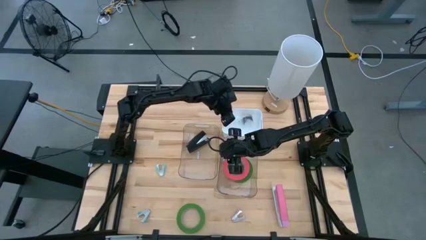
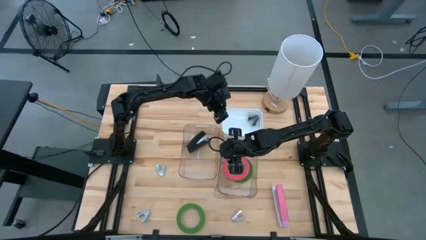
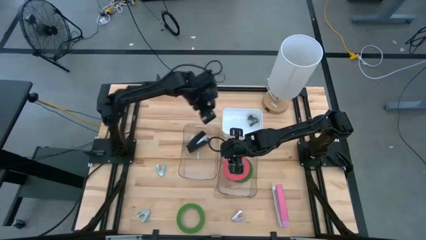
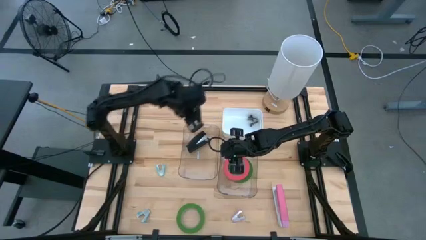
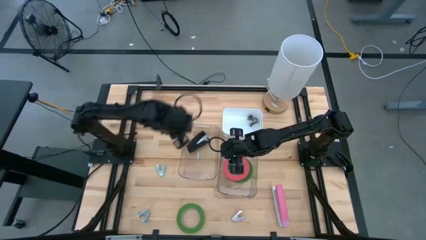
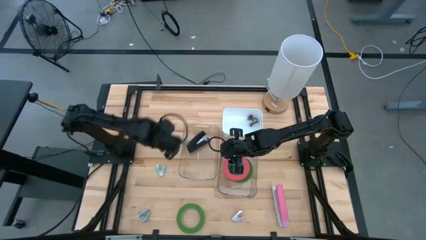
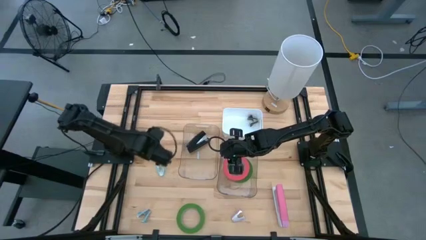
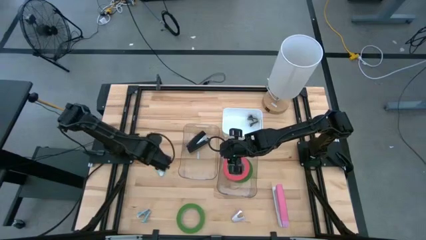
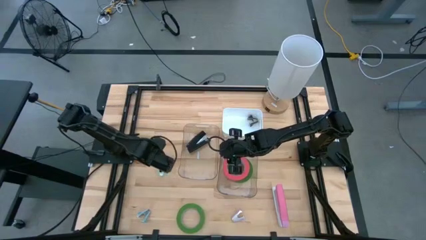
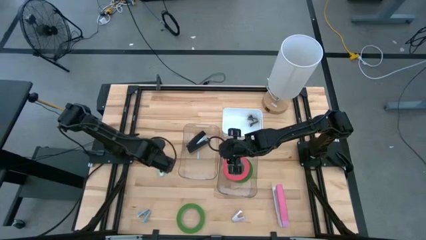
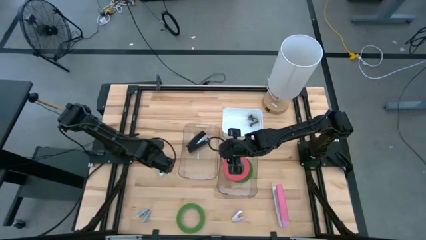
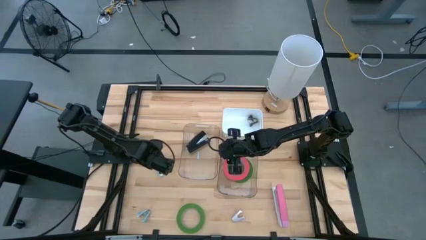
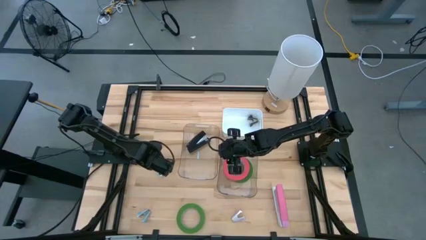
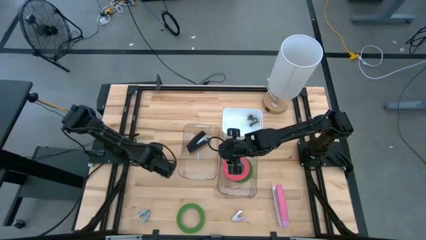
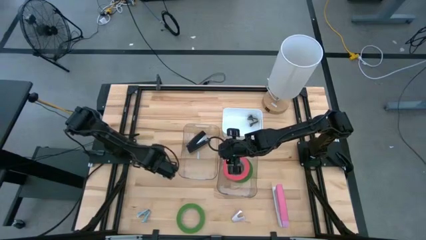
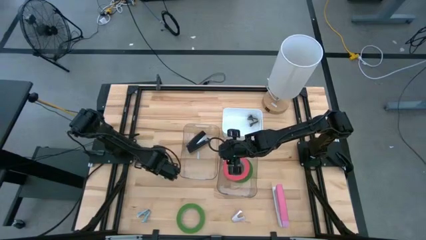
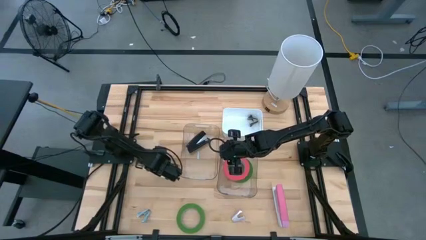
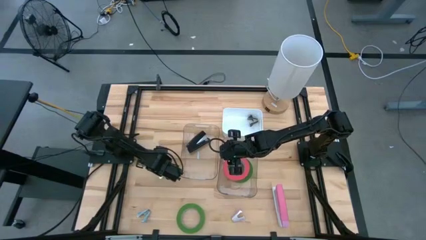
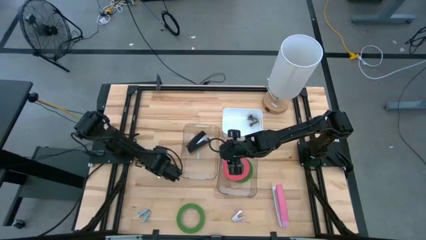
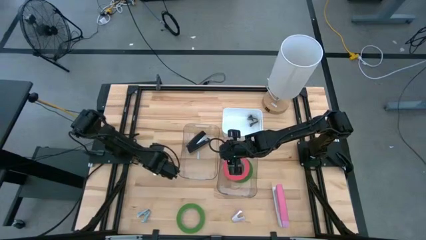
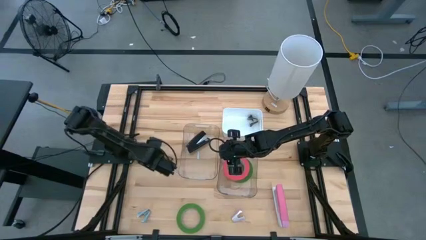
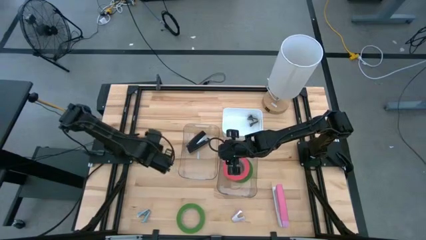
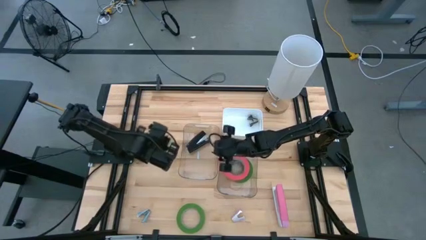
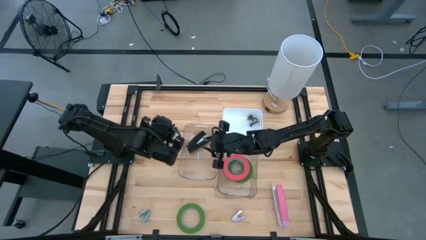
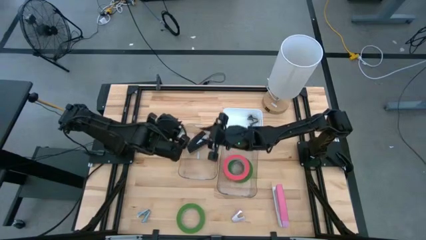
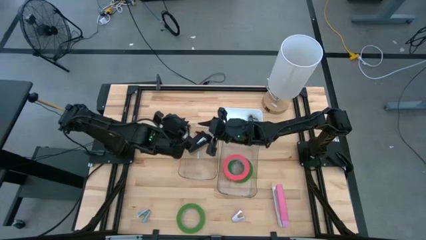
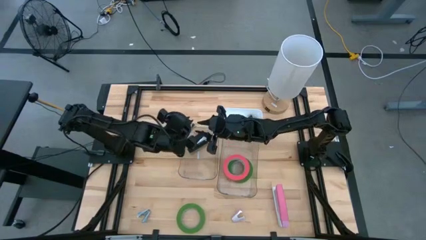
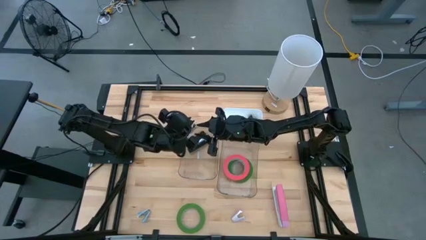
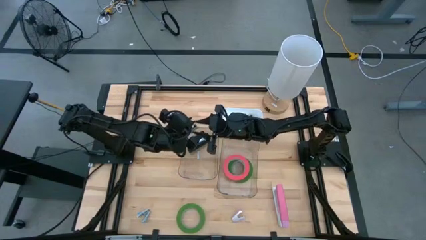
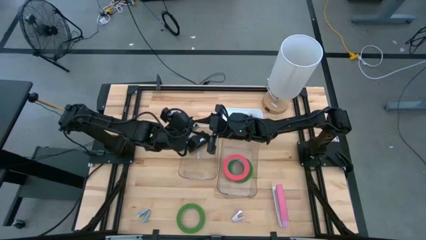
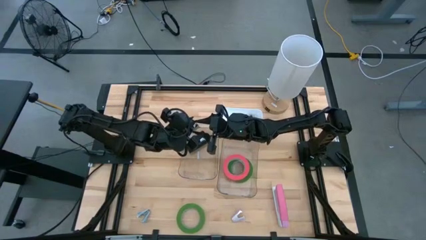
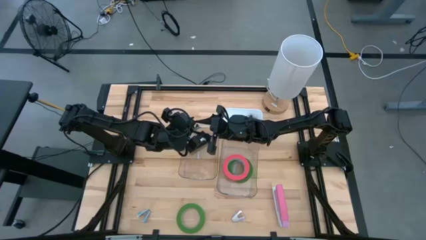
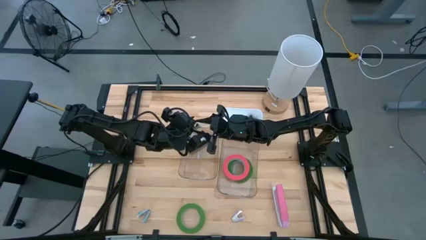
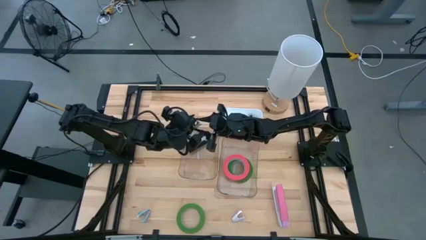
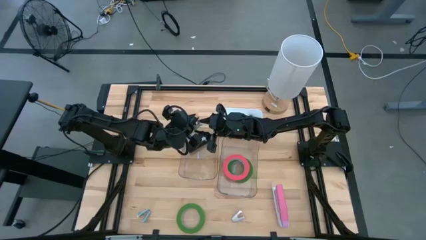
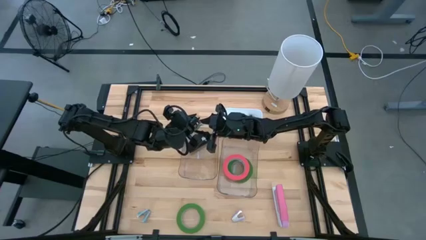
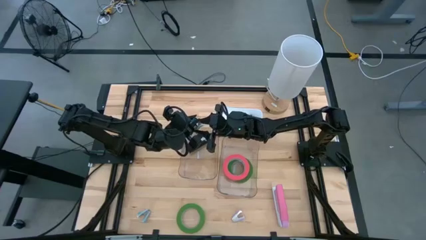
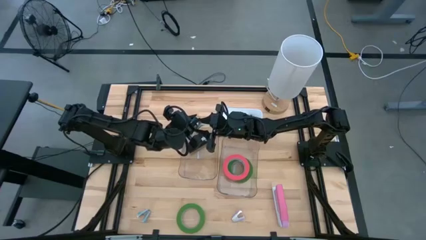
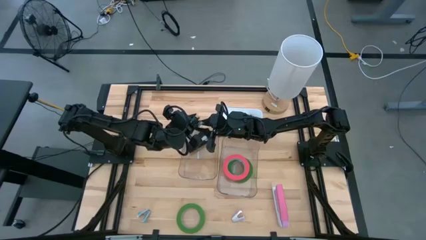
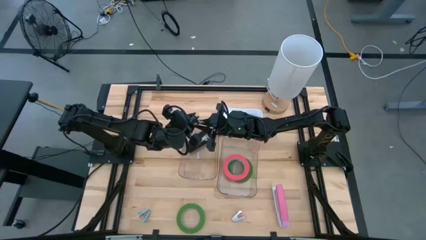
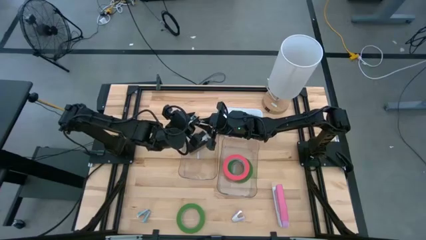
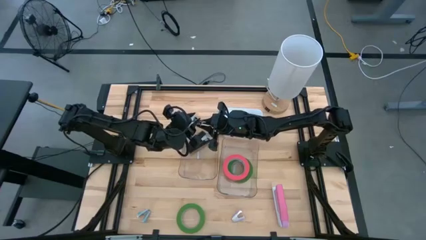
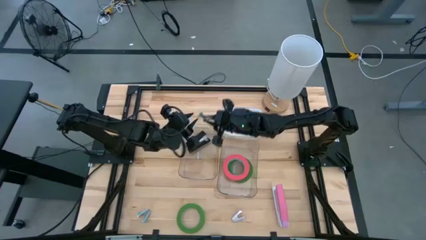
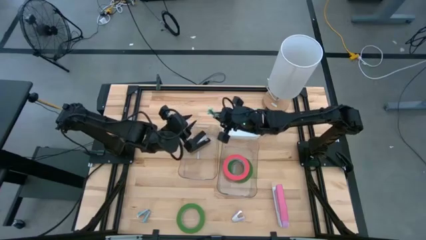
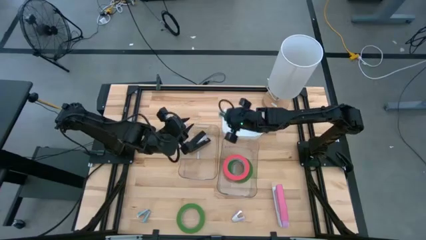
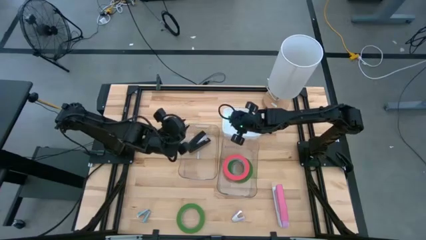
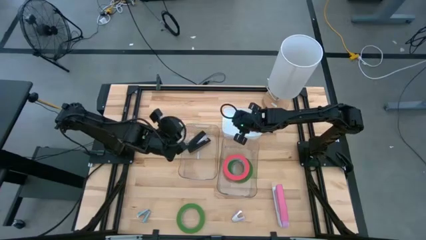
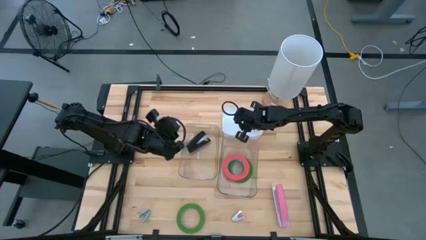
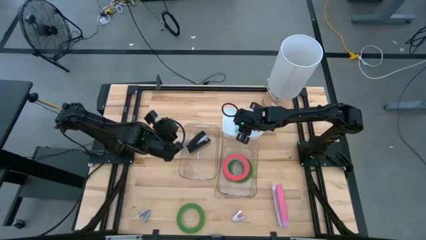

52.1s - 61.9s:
Task: Pick and place Stapler, Stapler remover, tape
Put the green staple remover into the white bin

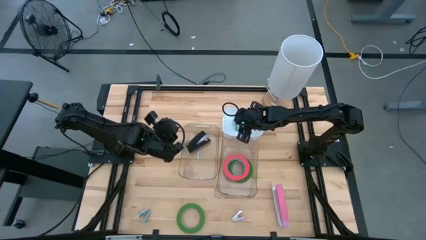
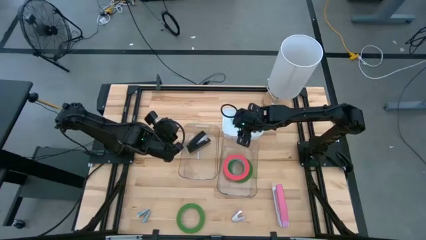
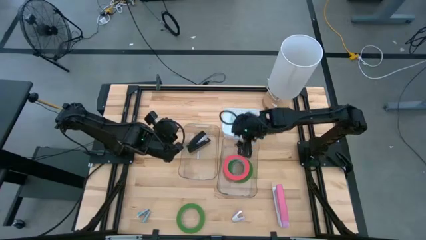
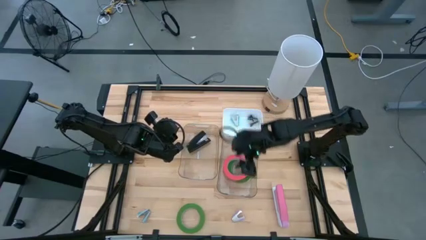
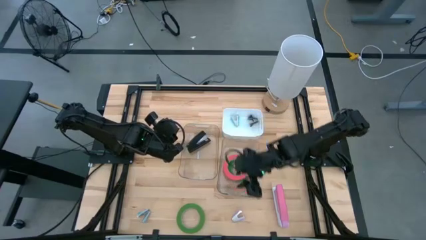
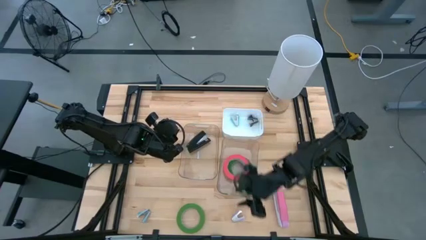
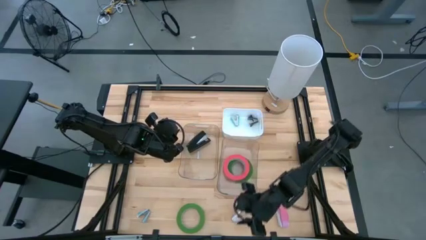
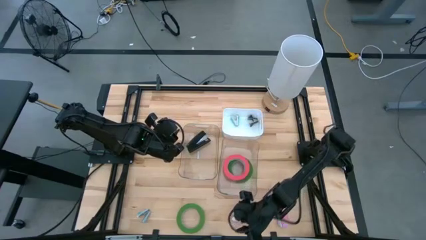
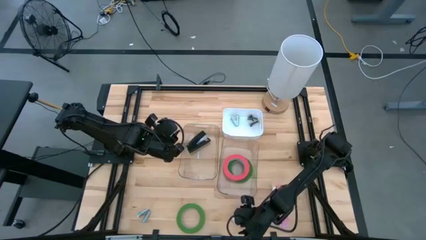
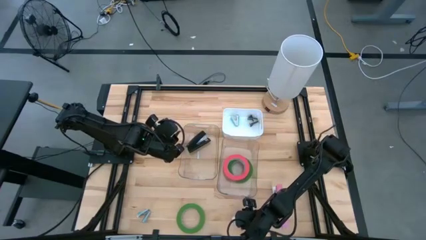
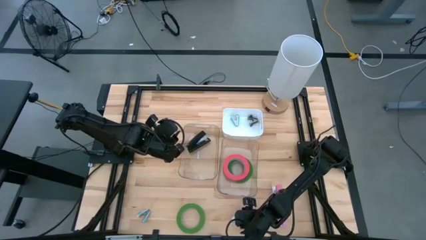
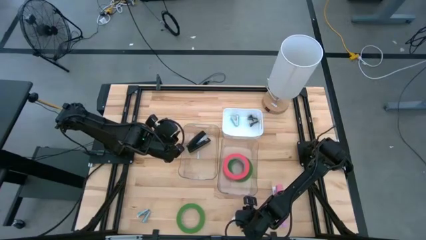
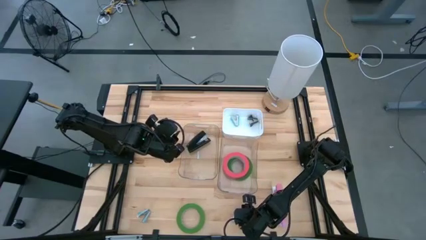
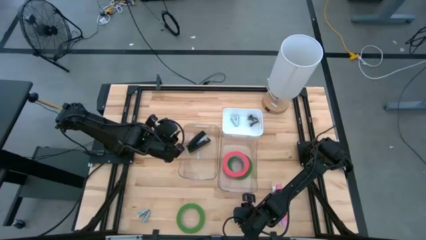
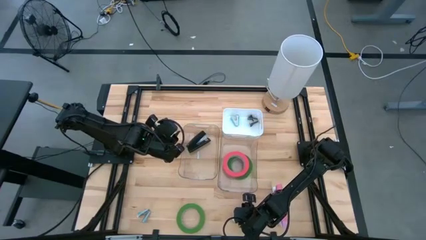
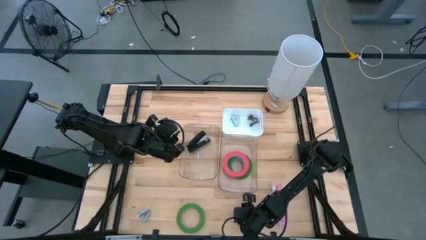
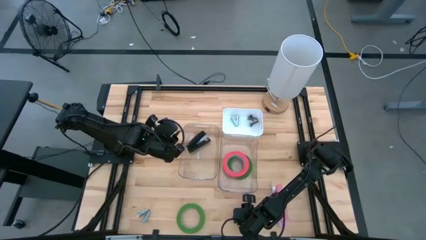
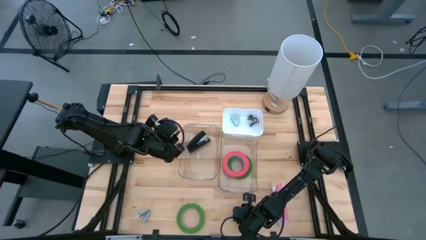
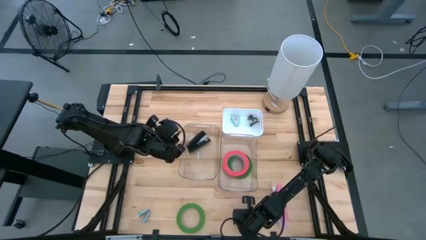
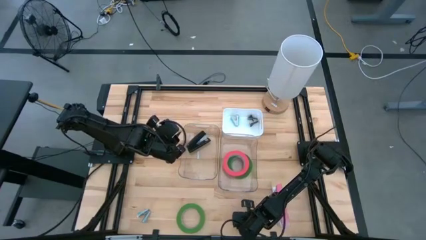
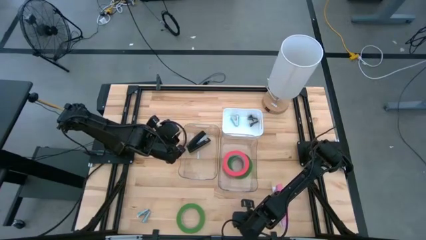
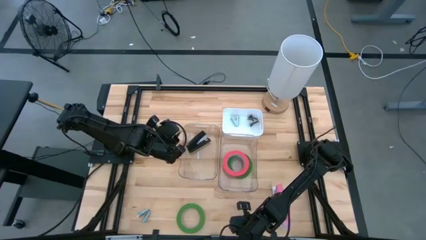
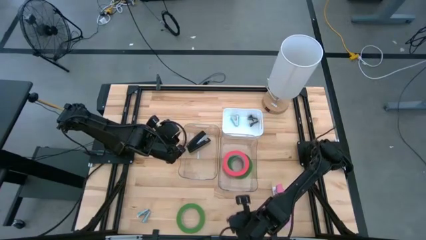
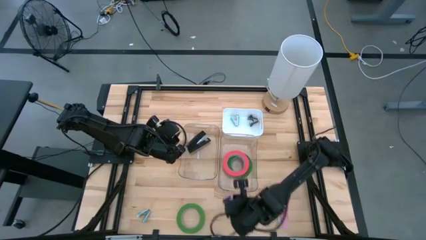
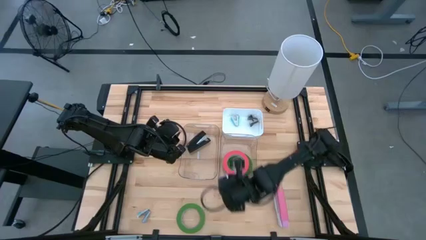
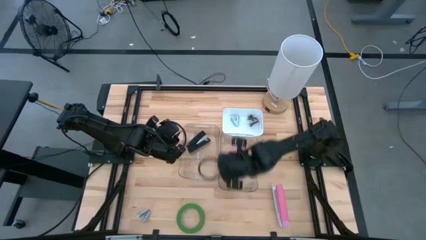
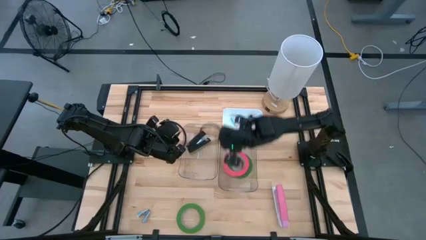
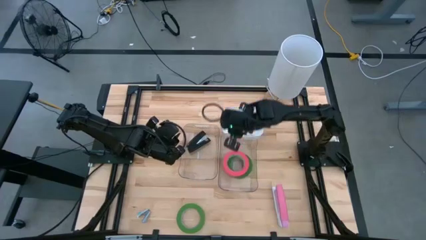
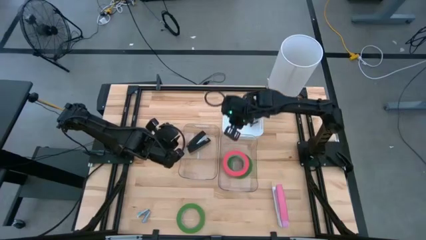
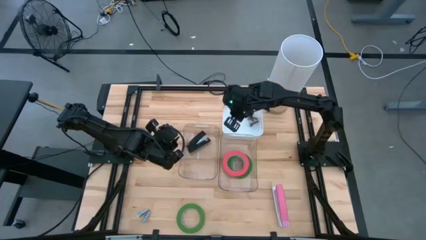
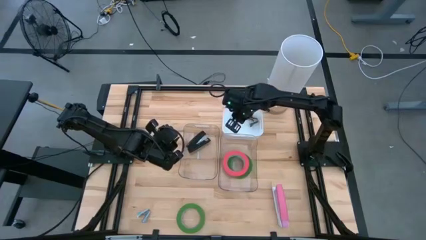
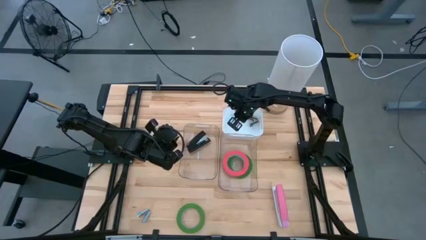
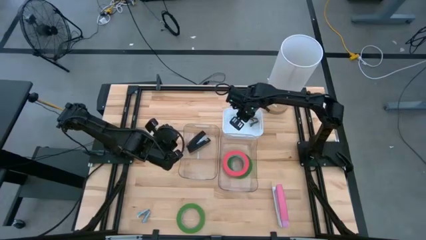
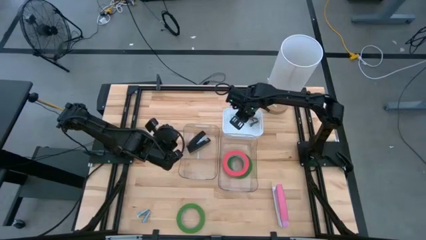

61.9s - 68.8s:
Put the purple staple remover into the white bin
